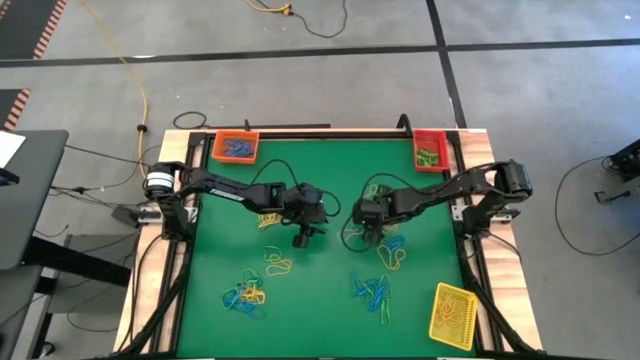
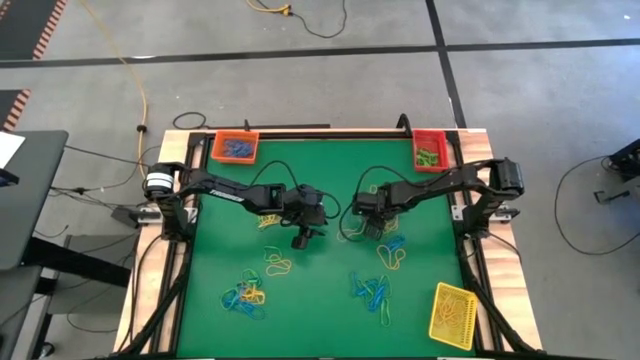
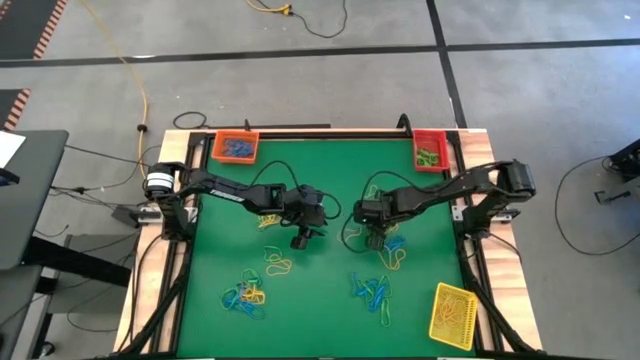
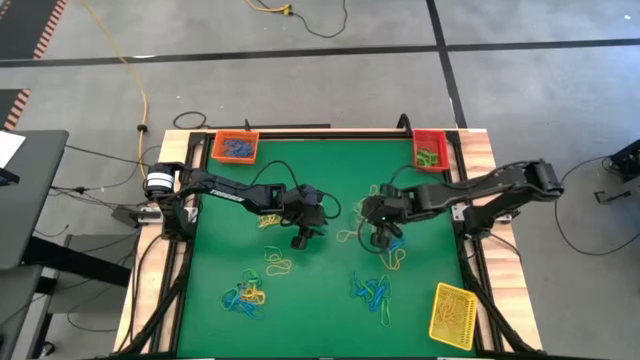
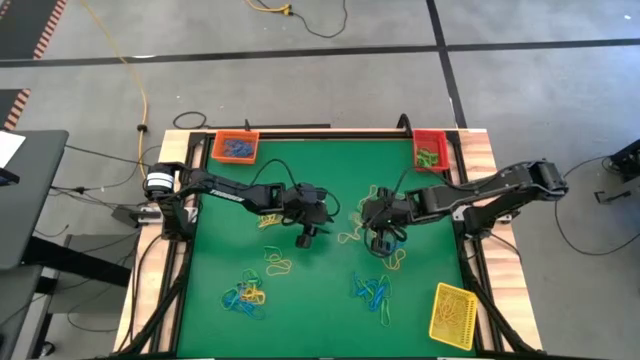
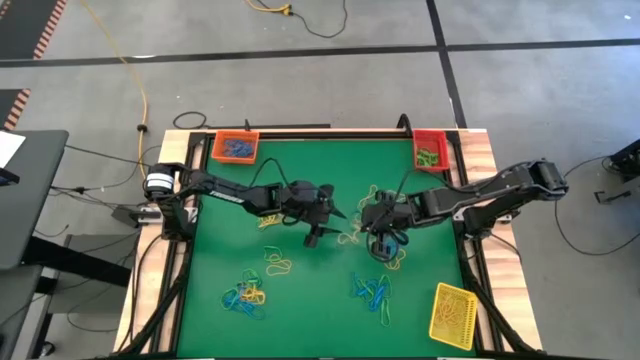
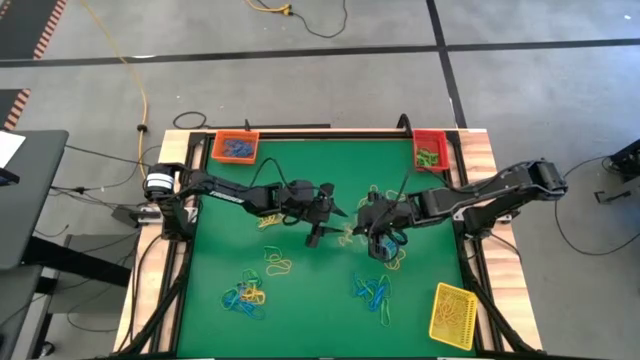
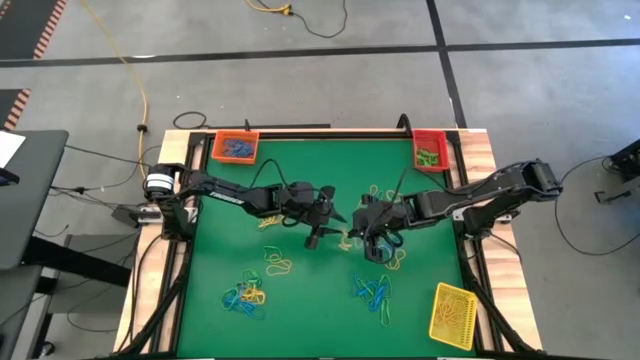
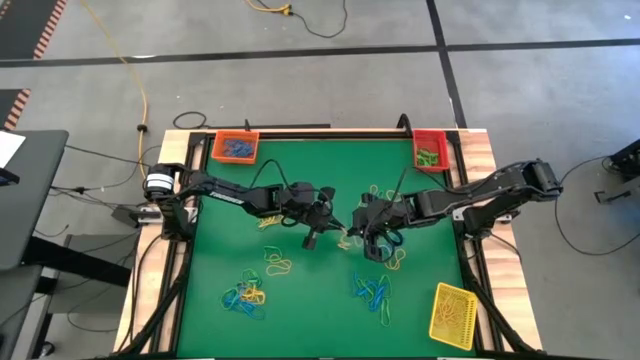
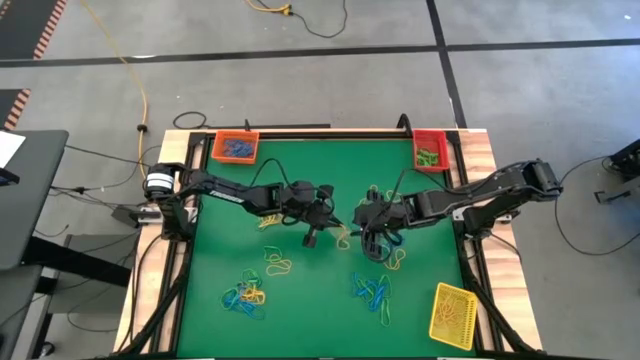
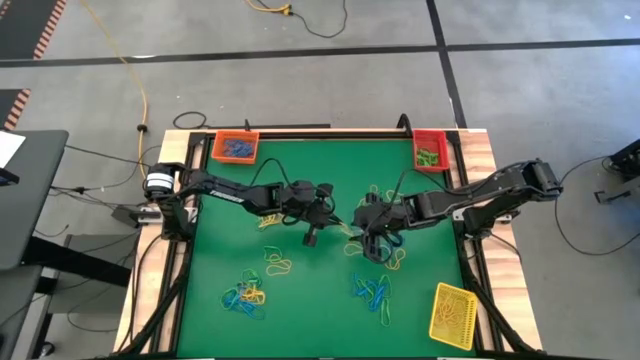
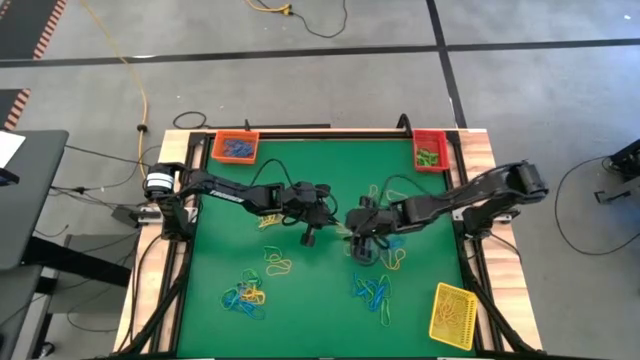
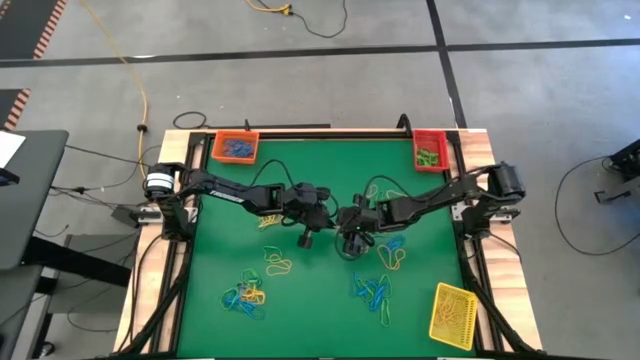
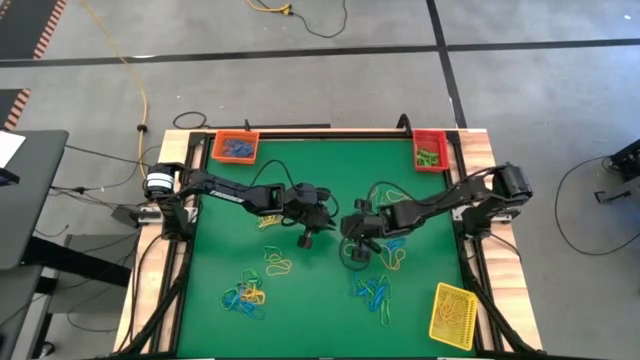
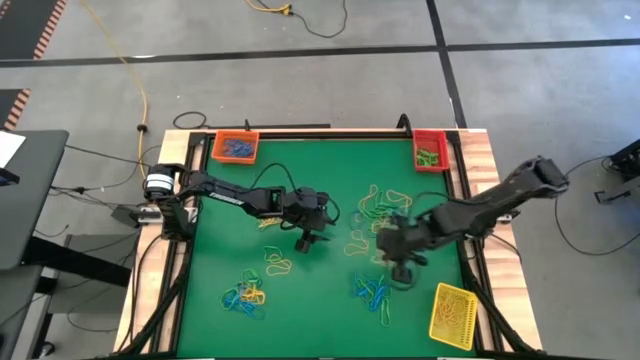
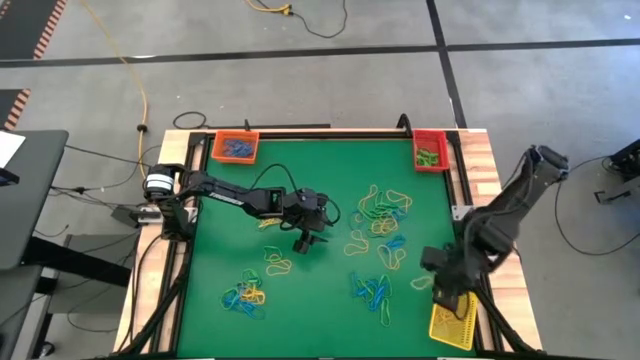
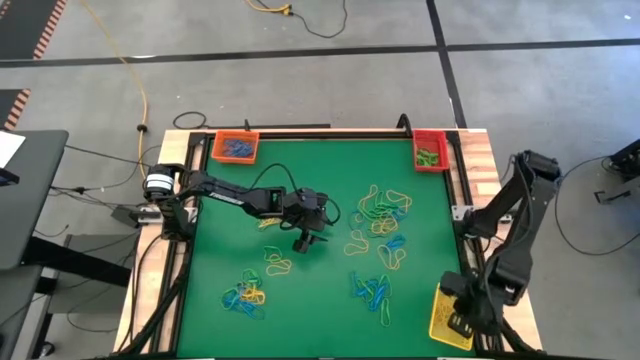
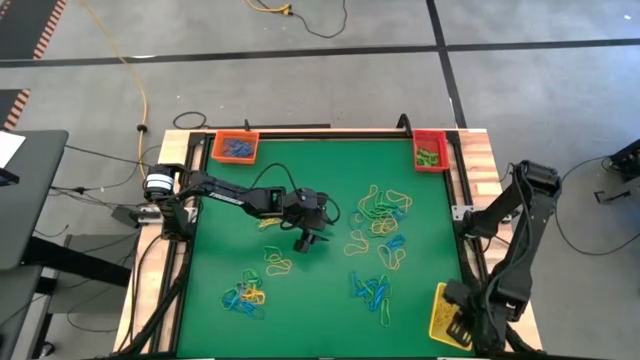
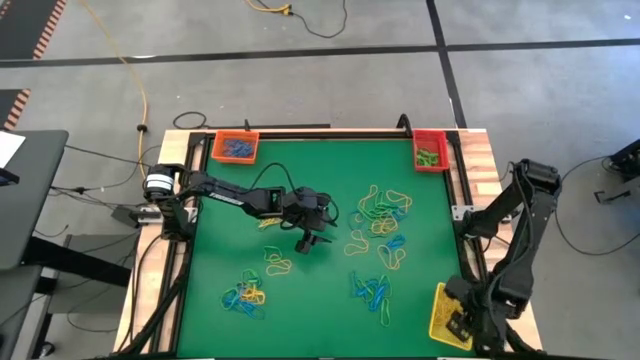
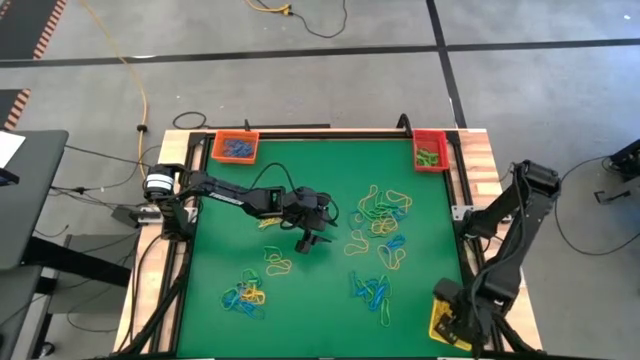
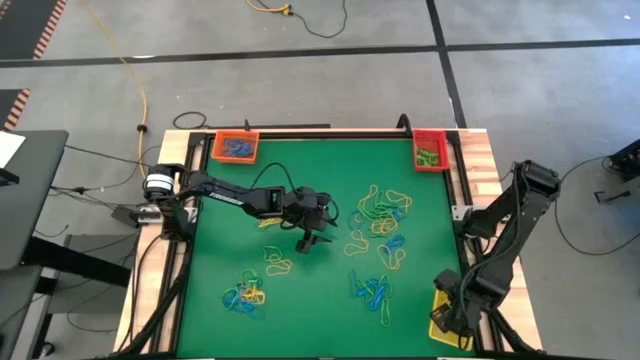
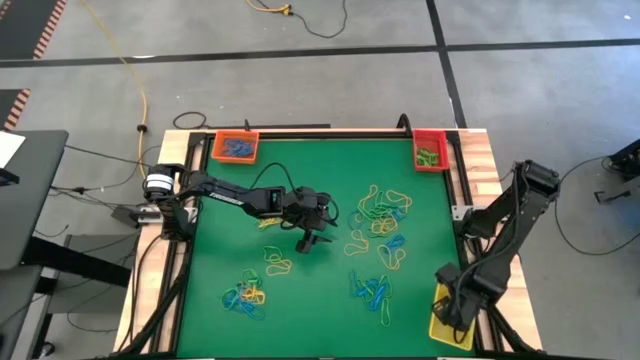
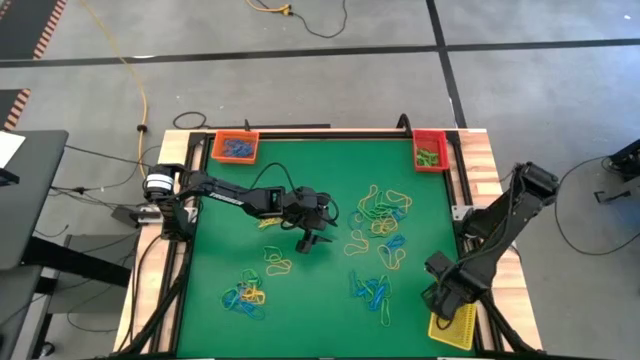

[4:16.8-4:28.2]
Task: Sort rubber bands into baskets
Put the top right yellow rubber band into the yellow bin

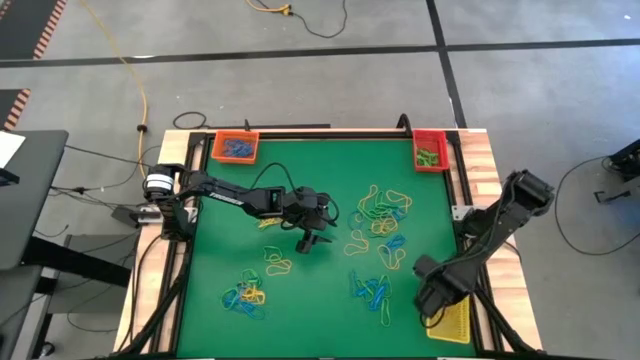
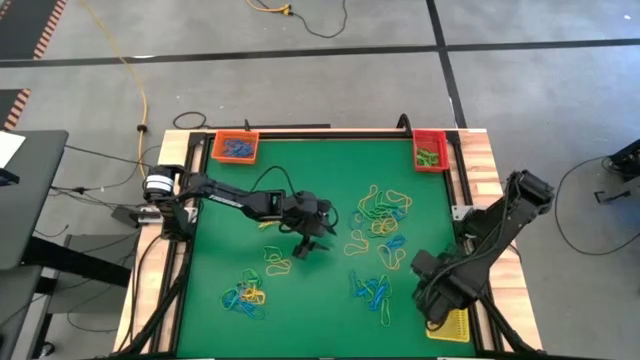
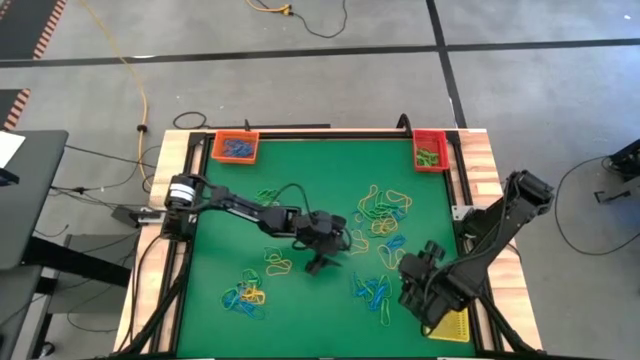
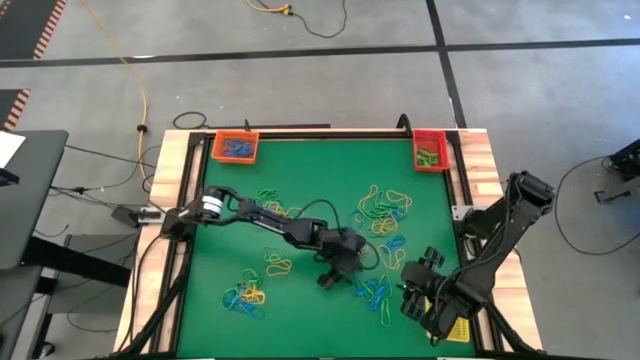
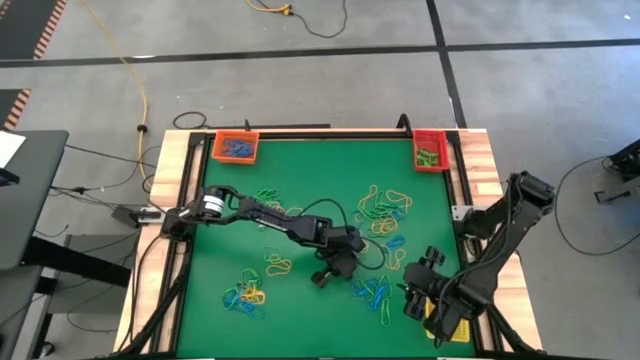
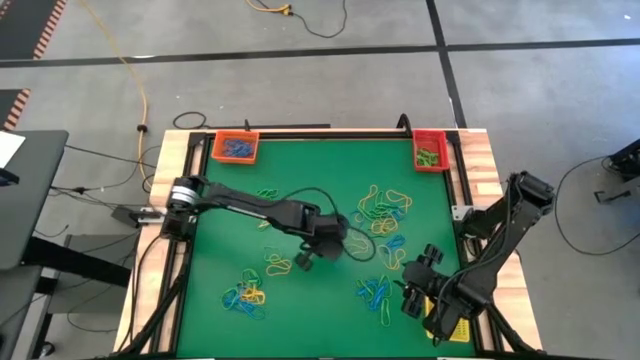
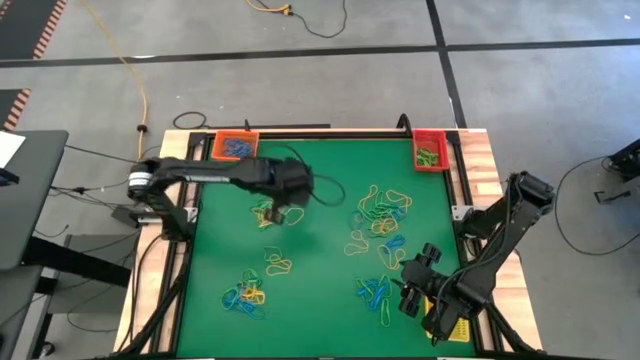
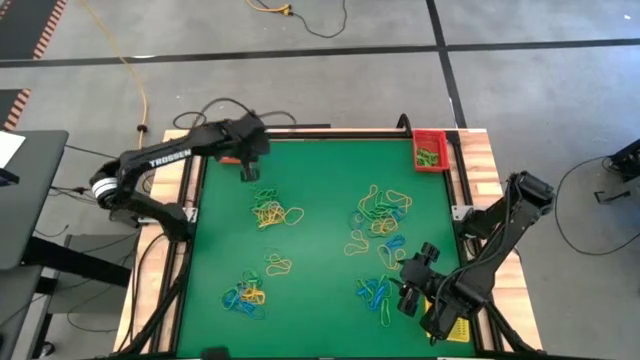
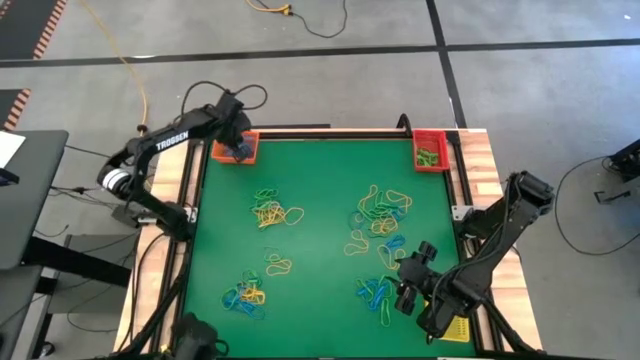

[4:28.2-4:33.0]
Put the bottom right blue rubber band into the orange bin

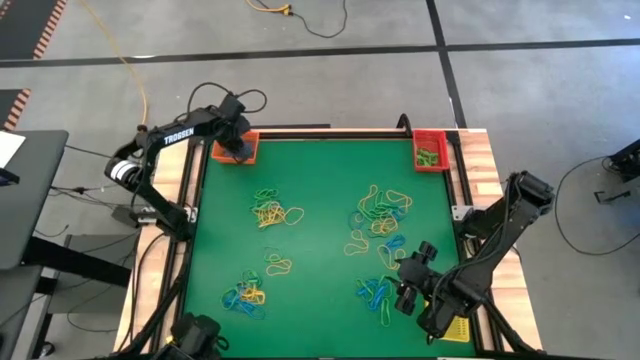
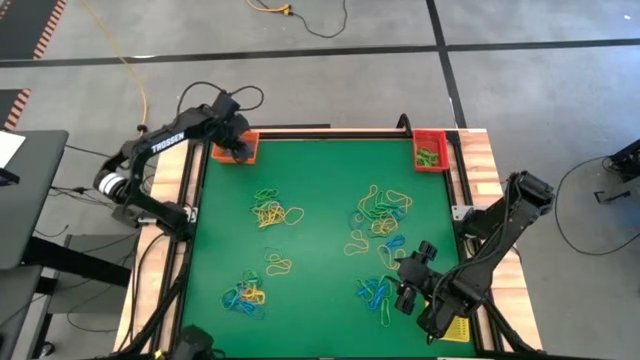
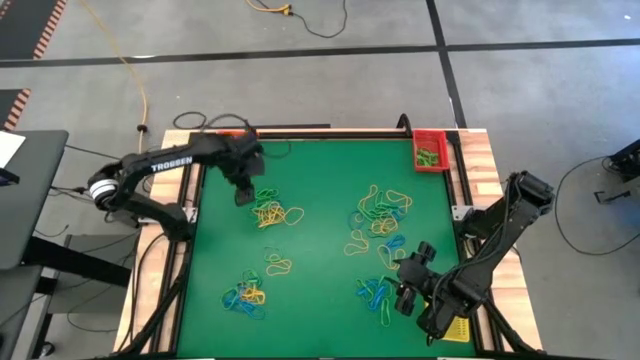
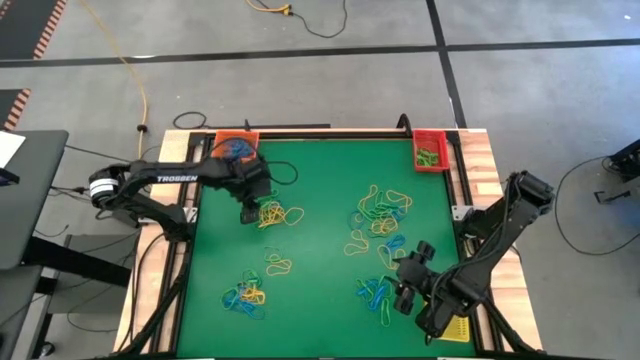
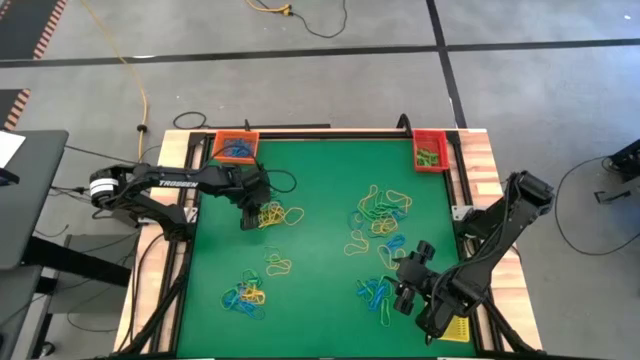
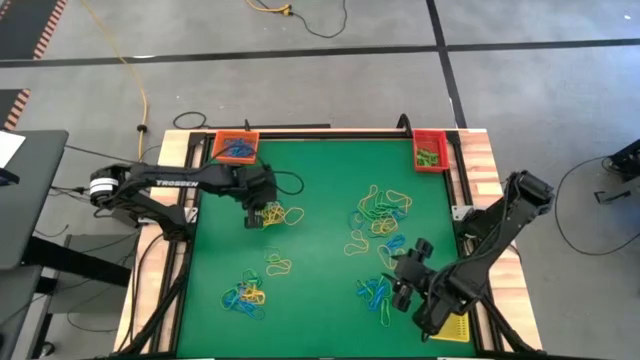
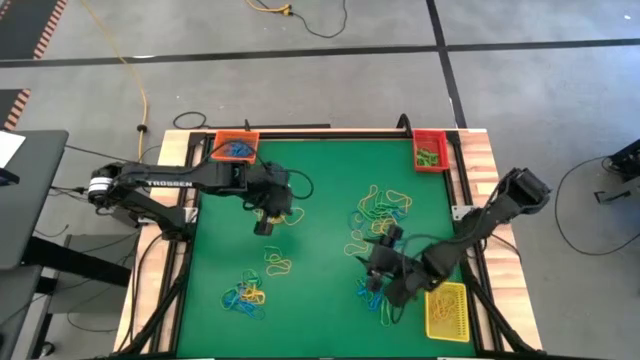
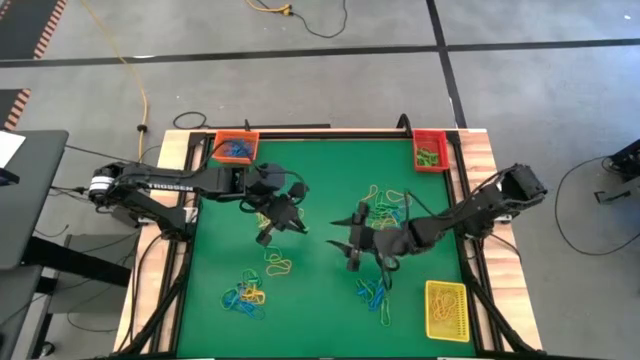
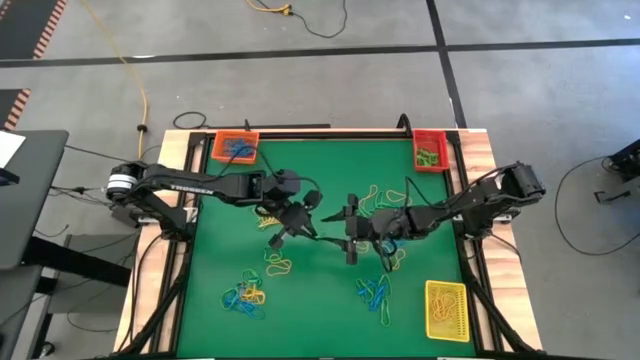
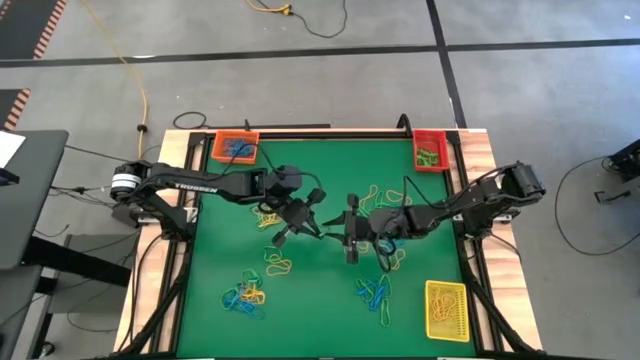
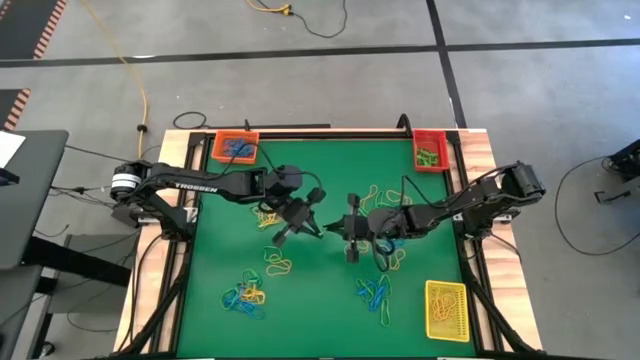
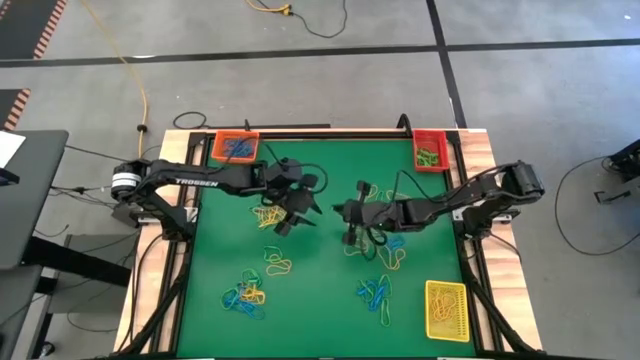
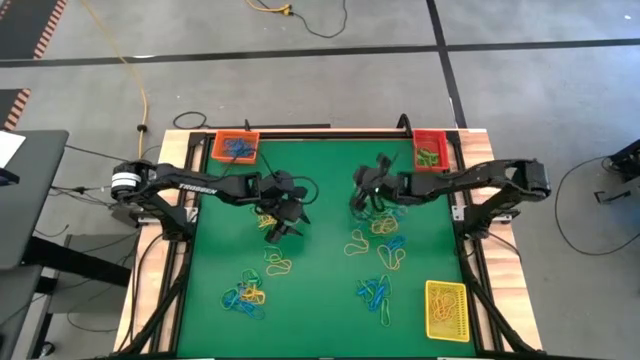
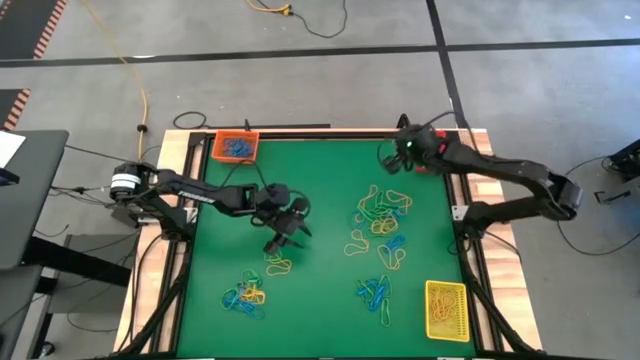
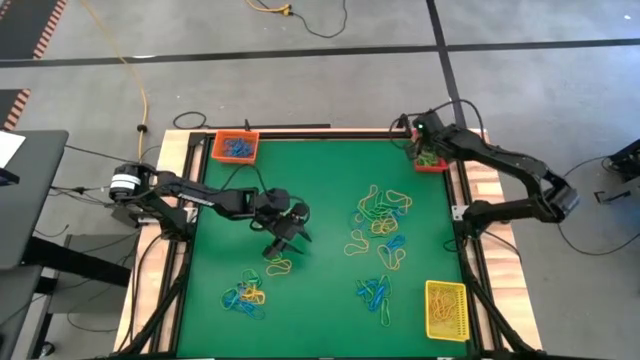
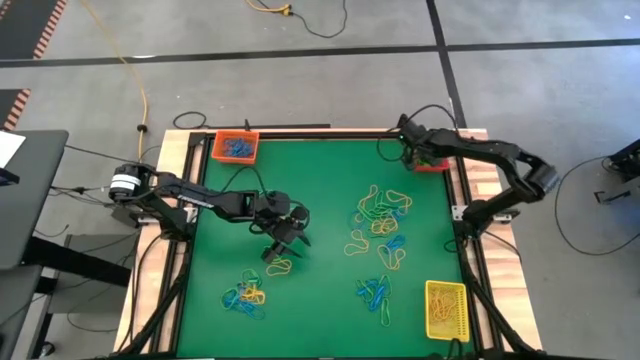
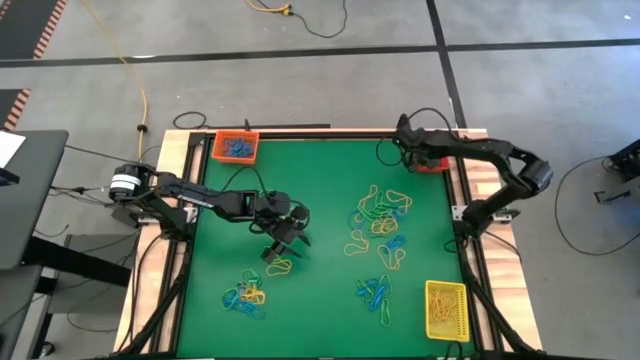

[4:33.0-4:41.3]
Put the top left green rubber band into the red bin
